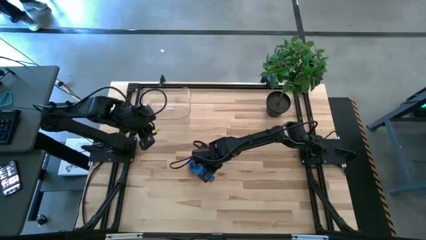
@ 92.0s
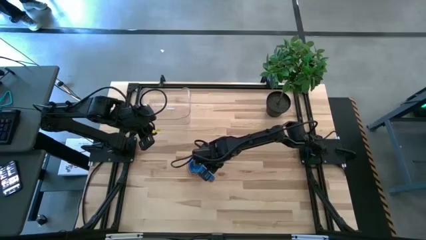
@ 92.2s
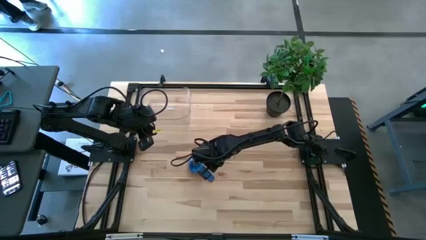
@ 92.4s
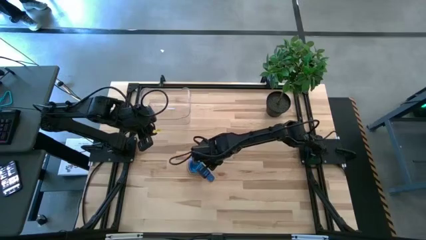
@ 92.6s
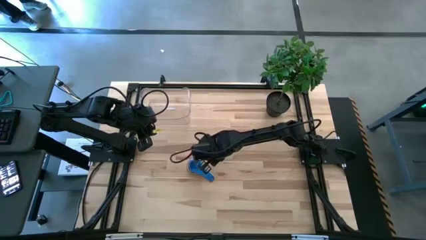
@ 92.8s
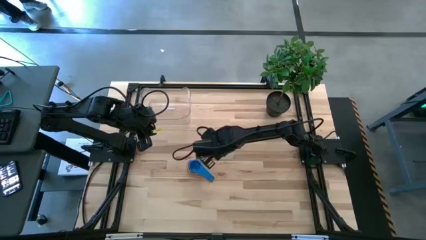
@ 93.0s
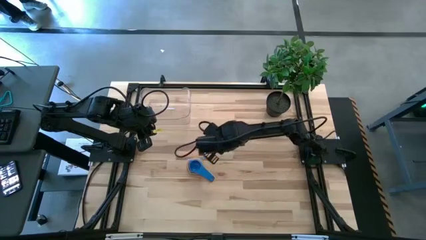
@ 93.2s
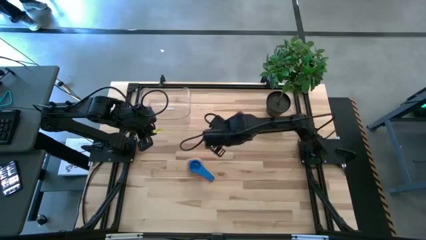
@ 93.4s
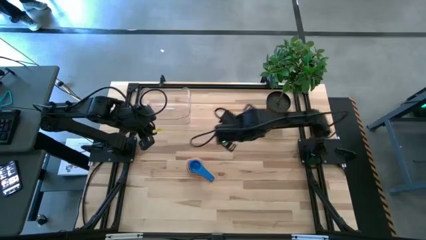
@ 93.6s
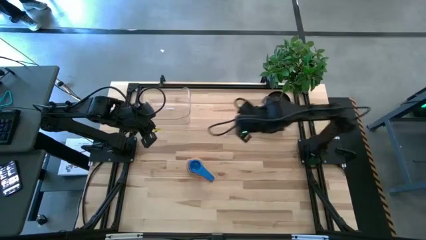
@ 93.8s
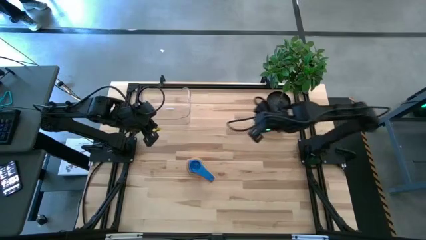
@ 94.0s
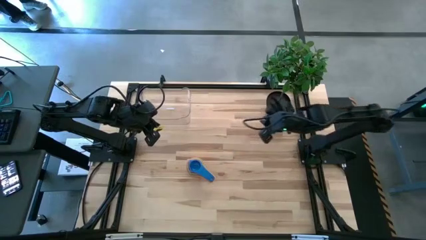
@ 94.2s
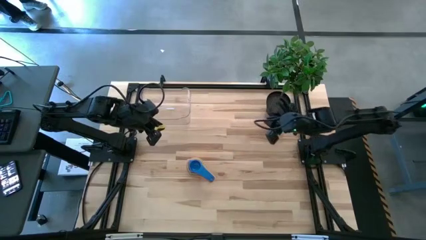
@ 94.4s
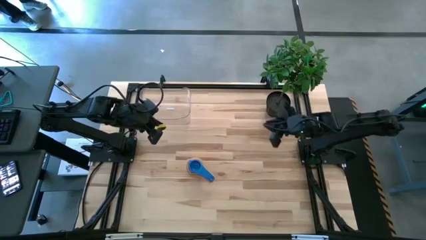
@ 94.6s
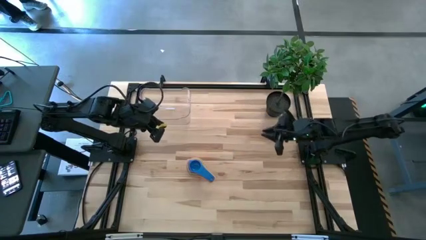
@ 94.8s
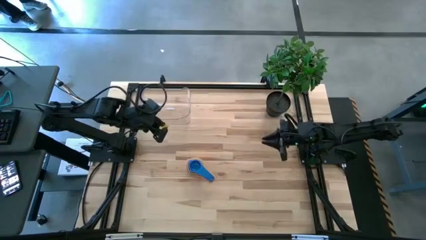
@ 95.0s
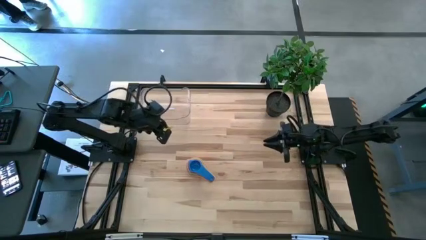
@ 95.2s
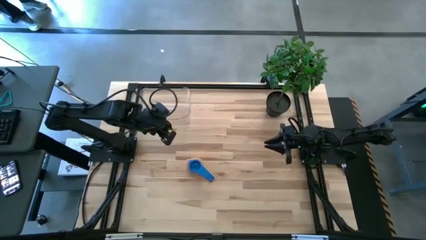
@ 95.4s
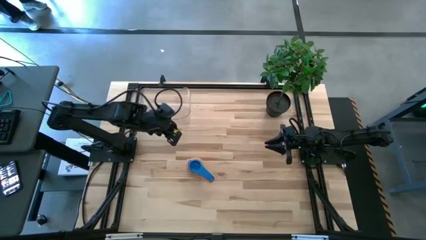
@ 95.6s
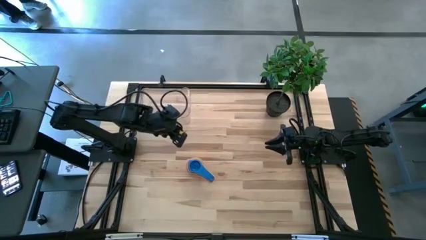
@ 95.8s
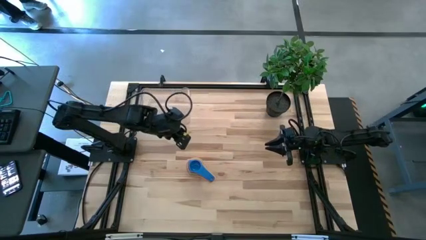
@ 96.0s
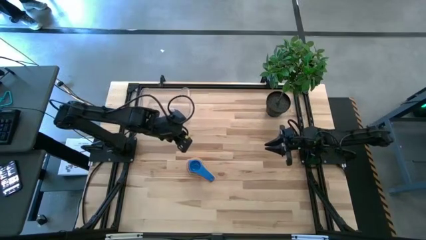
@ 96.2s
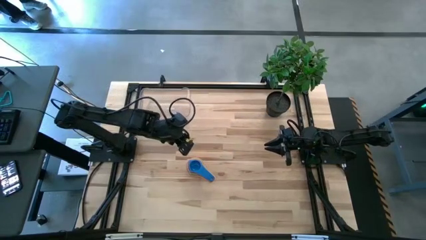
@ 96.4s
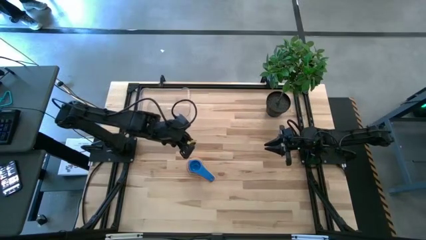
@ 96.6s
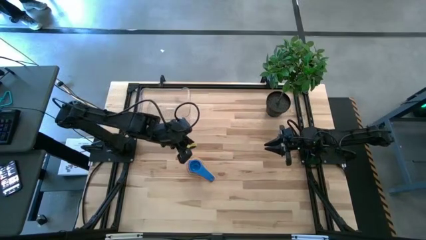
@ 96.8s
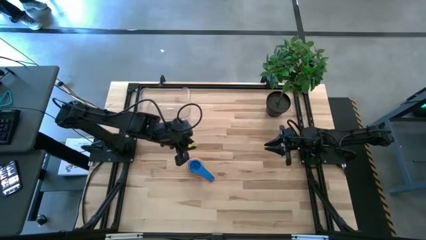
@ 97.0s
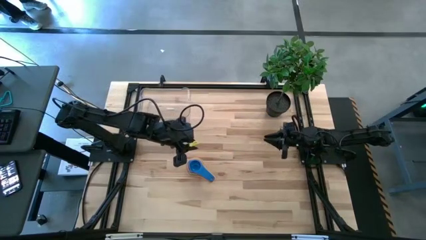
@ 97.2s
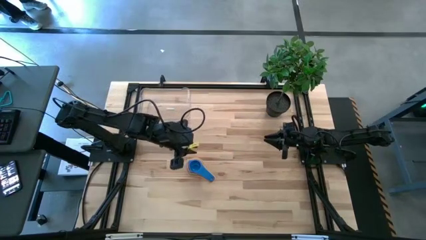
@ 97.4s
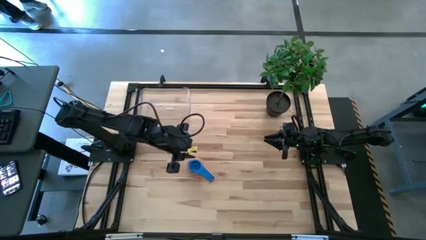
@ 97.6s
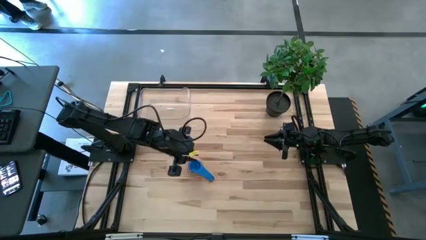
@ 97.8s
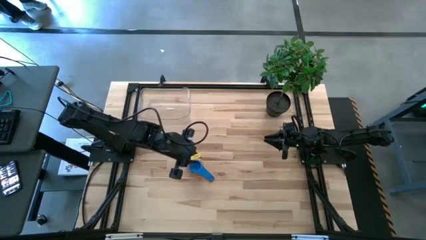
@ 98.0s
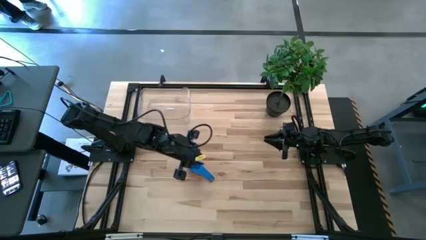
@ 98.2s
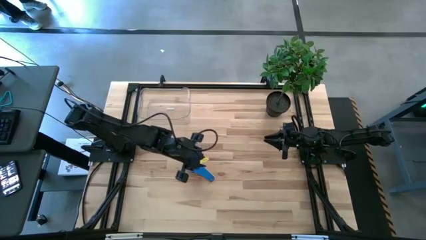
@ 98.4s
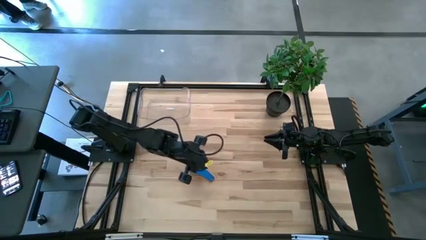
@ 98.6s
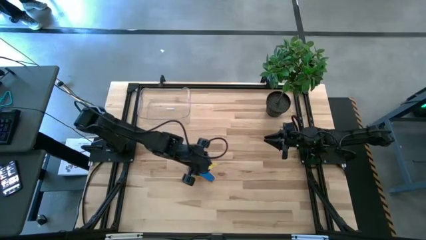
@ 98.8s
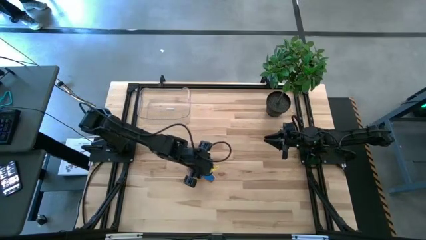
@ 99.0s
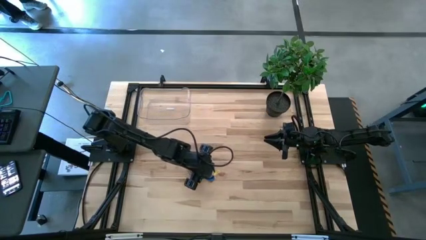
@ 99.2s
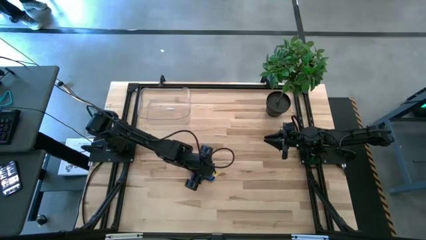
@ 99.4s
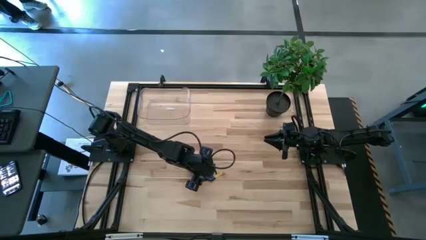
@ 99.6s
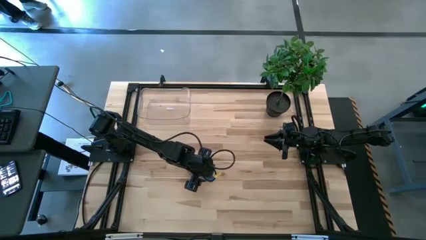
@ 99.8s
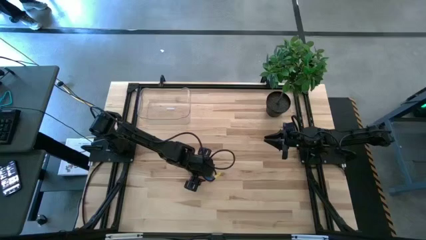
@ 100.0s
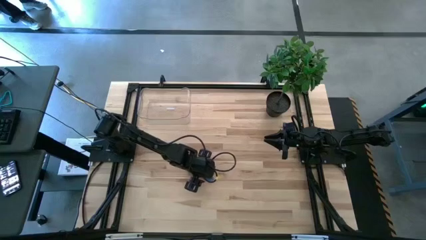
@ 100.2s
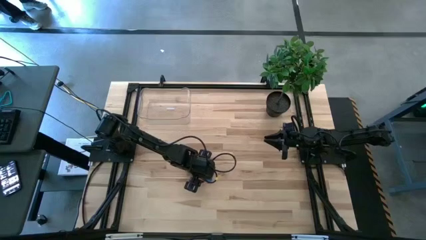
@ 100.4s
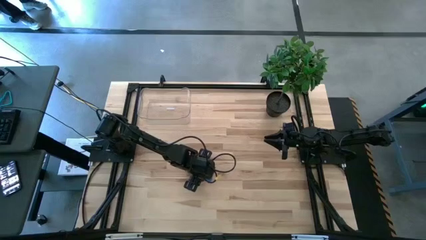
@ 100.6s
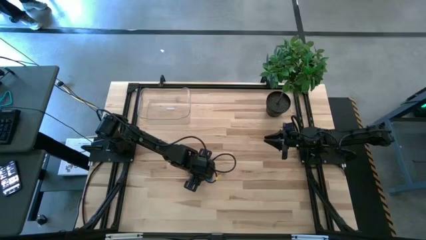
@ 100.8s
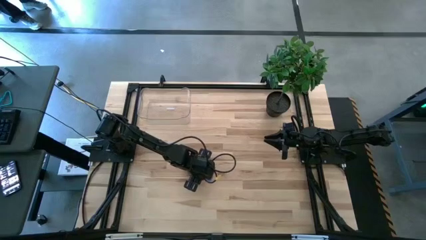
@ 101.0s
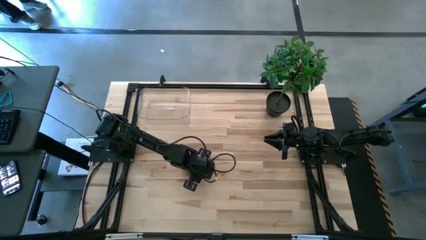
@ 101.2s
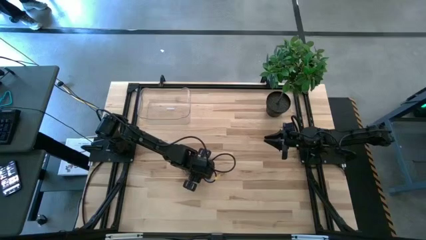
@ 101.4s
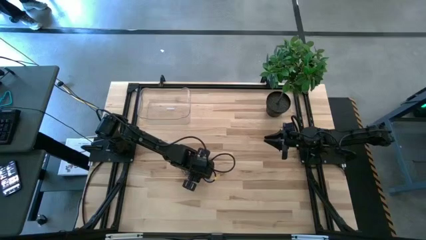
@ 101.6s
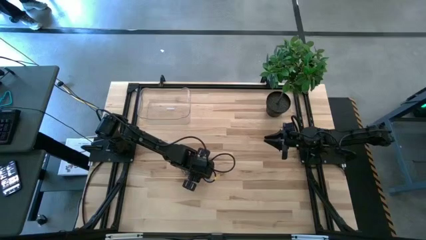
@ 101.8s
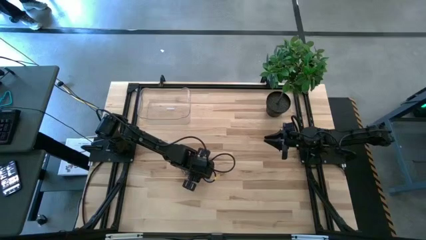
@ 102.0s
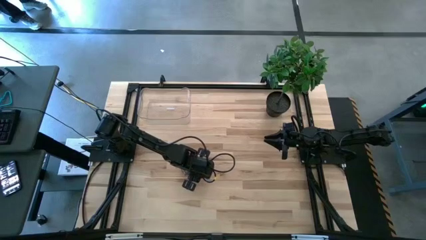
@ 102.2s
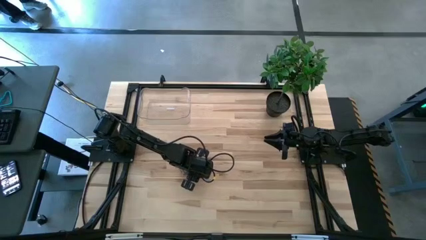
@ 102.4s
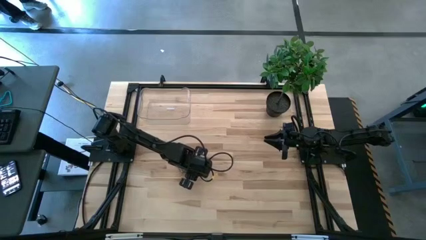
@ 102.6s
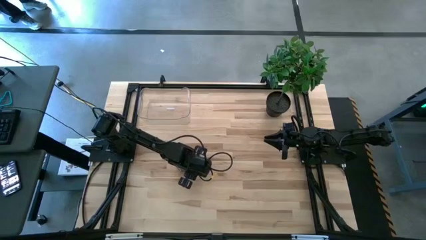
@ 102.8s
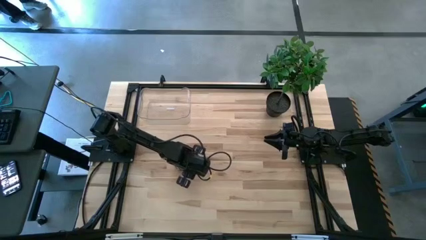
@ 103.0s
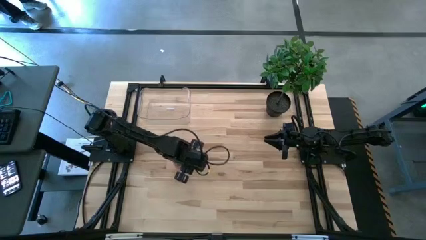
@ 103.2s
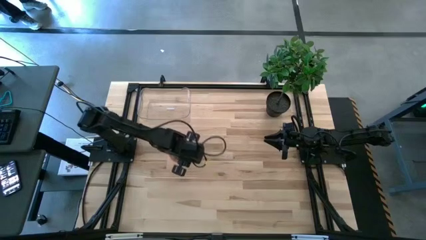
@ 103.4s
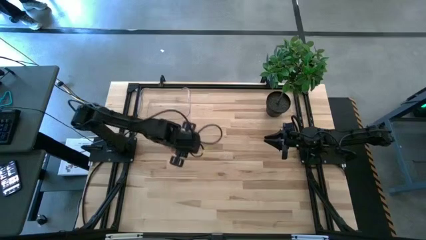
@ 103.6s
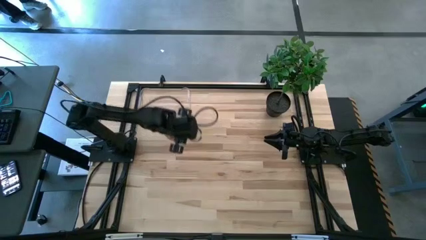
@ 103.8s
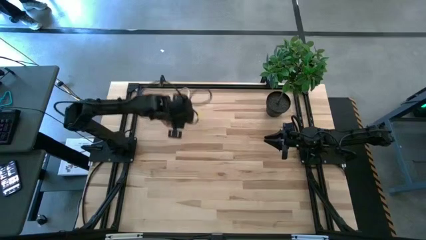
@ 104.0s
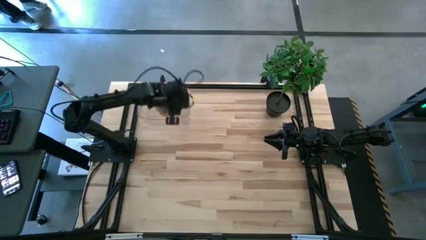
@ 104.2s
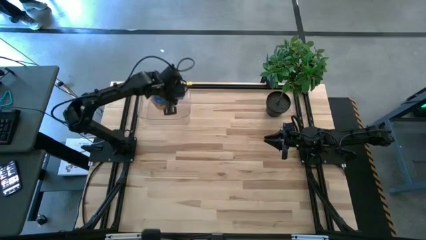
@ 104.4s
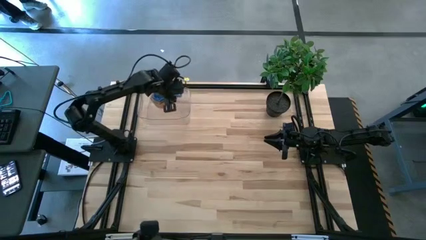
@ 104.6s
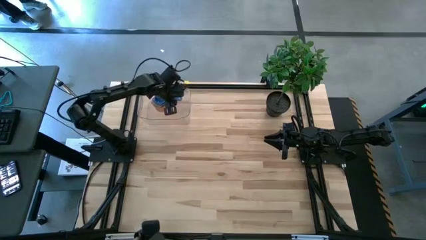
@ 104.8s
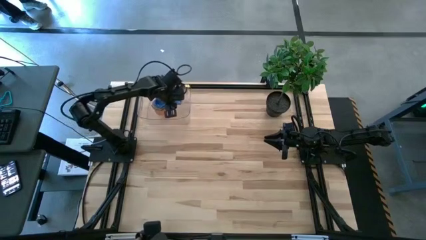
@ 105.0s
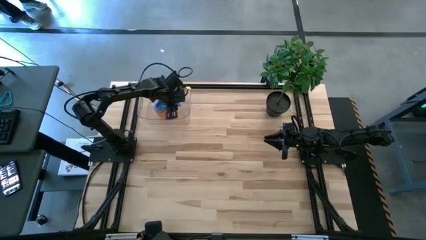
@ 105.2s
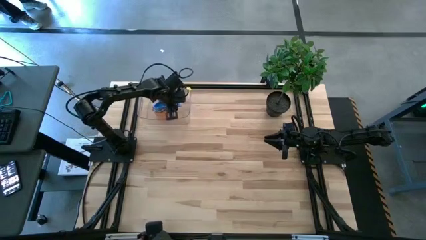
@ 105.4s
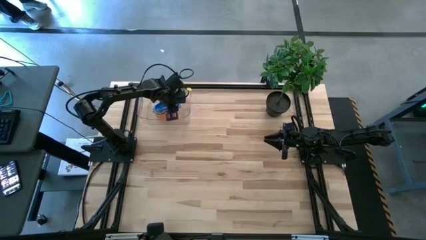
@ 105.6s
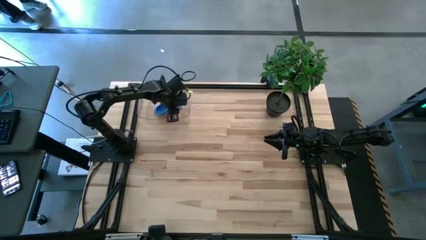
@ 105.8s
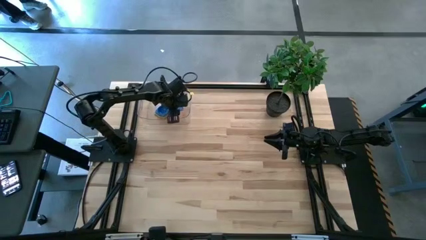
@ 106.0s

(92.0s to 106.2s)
Task: Nest measuring cups in basket
Put the stacked measuring cups in the transparent bin

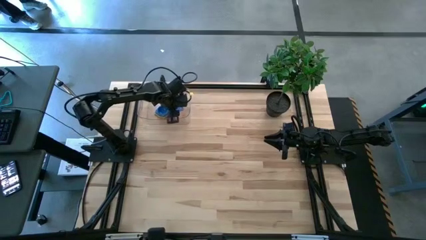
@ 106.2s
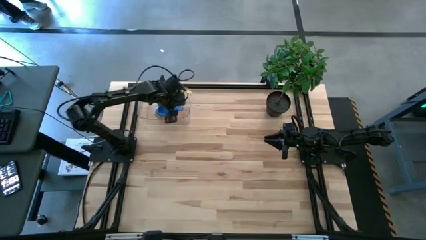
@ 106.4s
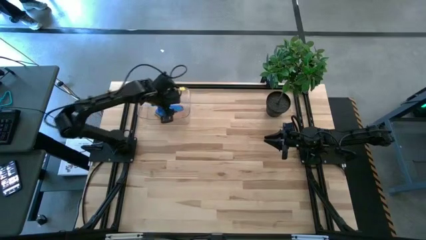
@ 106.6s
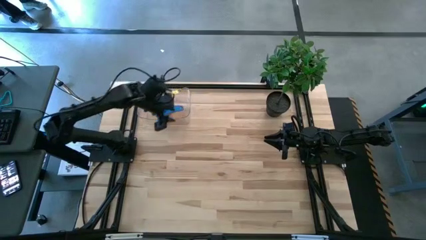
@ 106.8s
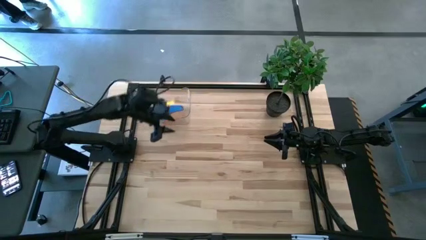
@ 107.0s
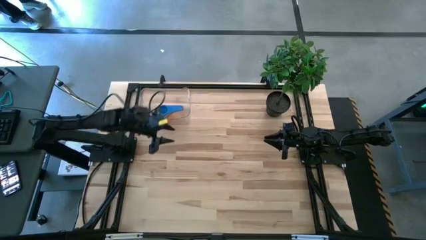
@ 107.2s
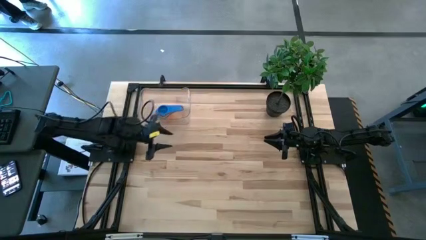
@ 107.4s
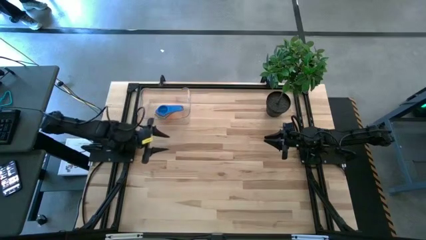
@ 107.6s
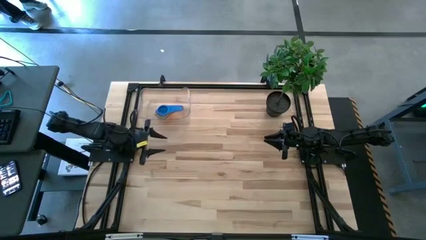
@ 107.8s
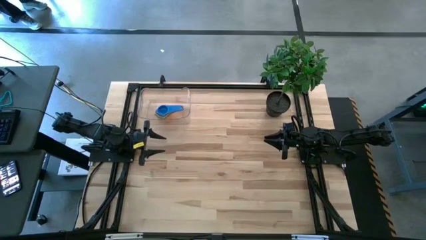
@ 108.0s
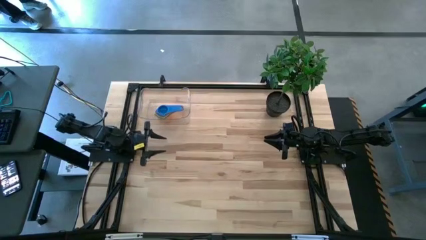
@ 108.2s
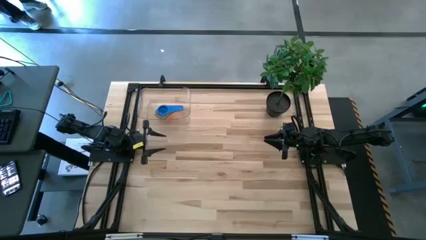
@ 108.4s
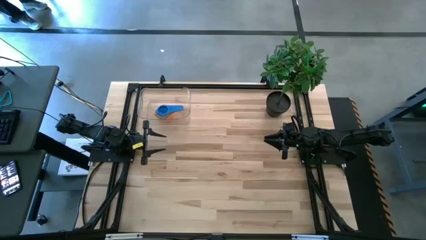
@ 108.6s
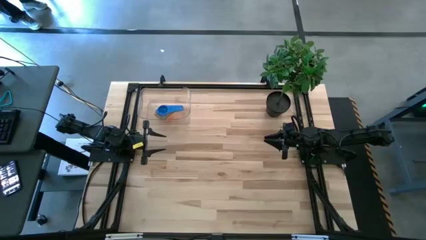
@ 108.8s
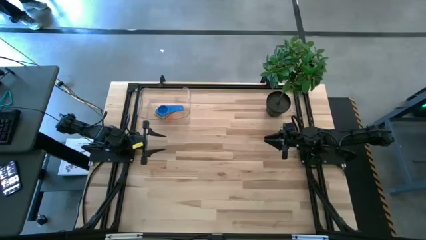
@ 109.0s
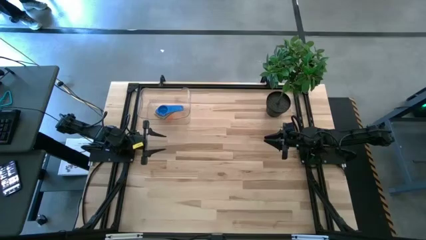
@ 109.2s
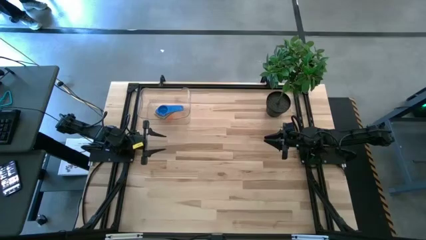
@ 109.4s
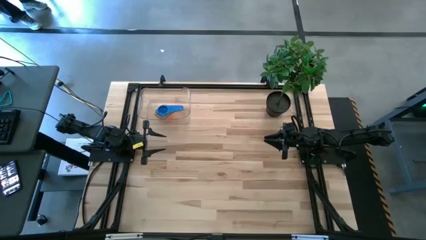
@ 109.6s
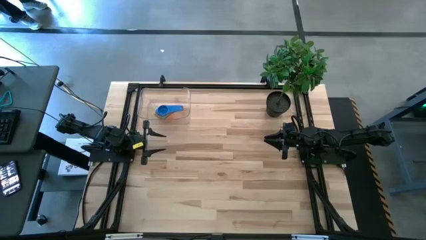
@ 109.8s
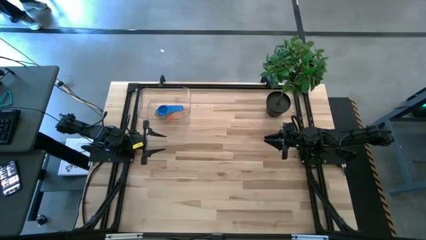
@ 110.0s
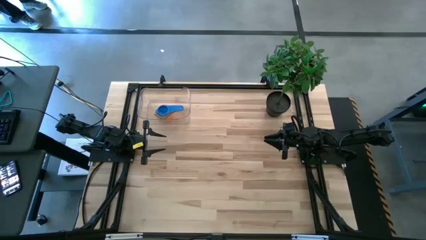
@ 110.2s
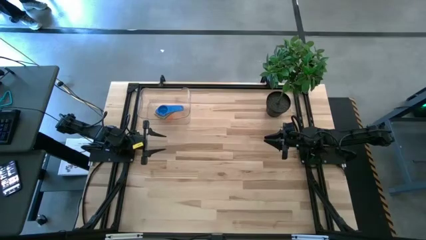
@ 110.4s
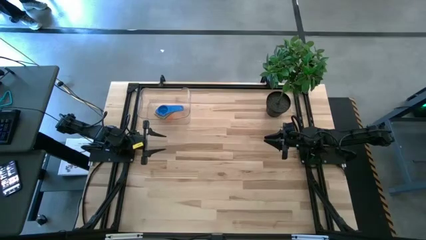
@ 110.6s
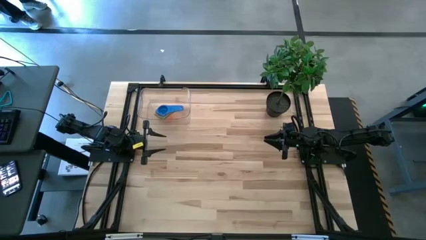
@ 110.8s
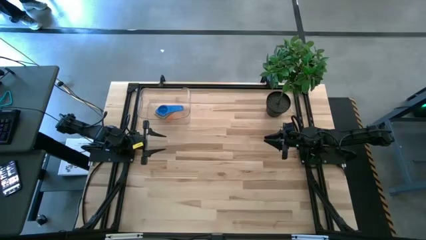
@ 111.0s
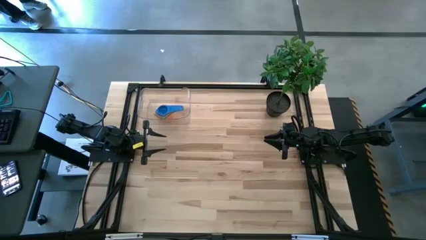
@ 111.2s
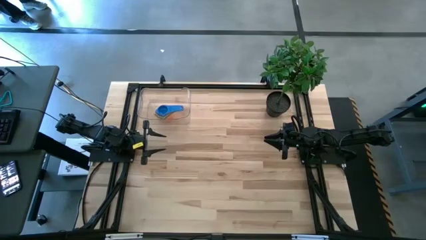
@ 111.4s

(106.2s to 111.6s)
Return to Home Position
